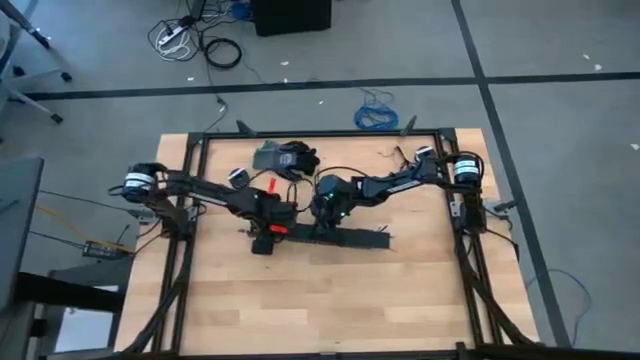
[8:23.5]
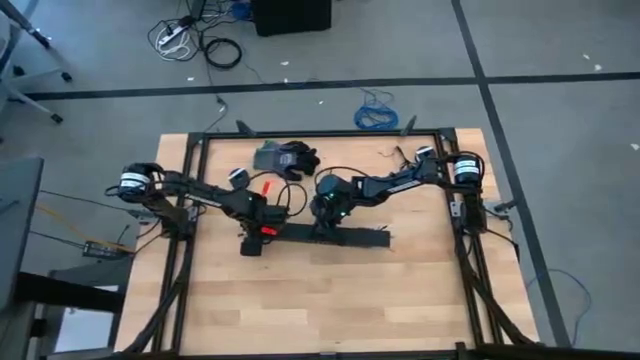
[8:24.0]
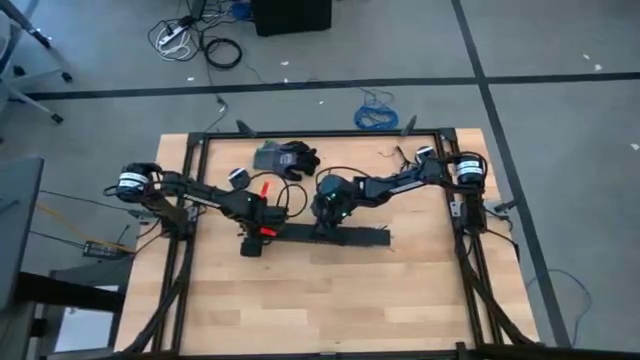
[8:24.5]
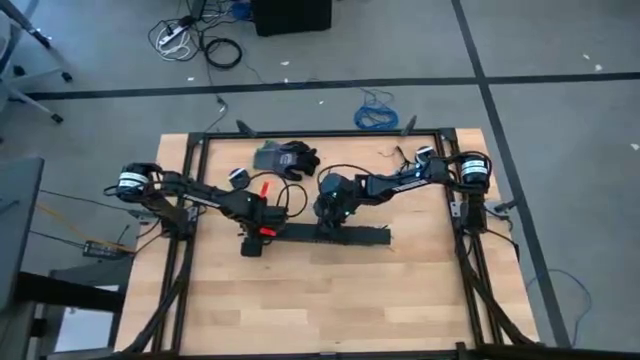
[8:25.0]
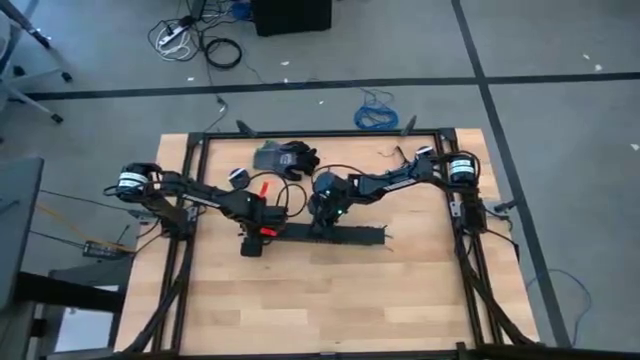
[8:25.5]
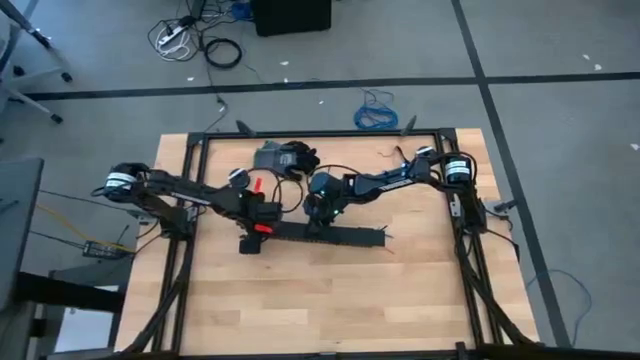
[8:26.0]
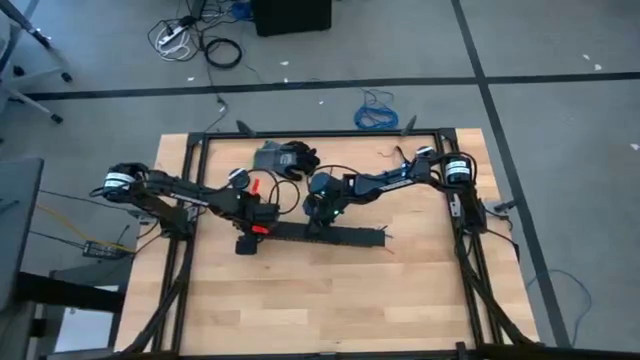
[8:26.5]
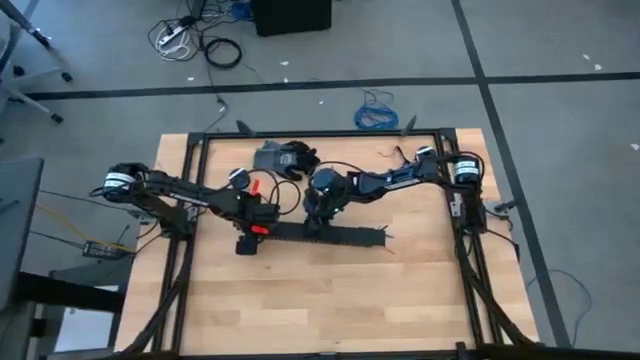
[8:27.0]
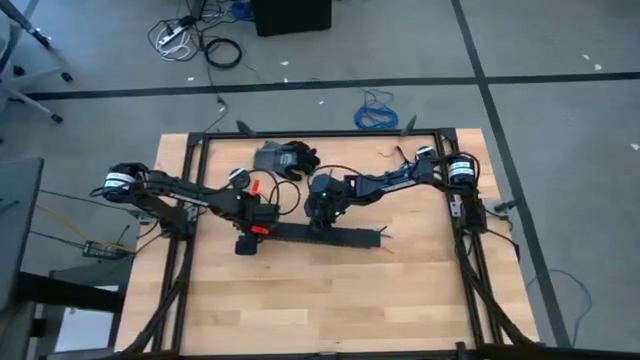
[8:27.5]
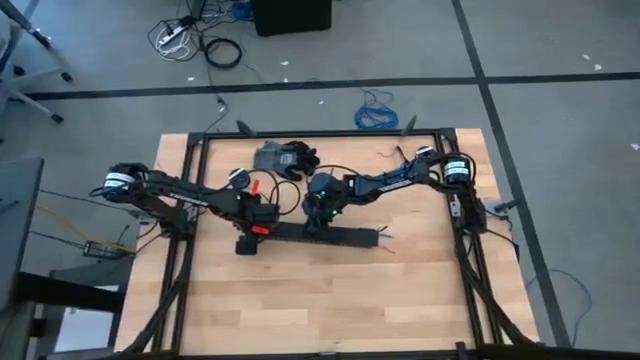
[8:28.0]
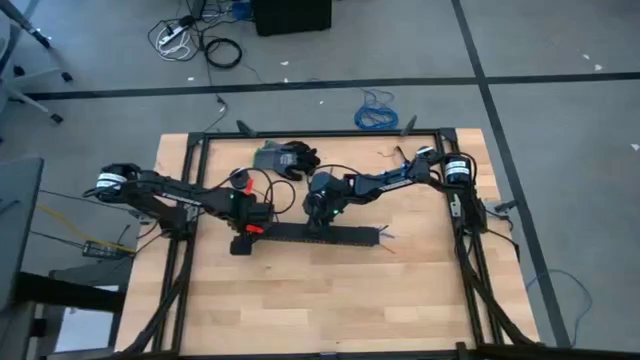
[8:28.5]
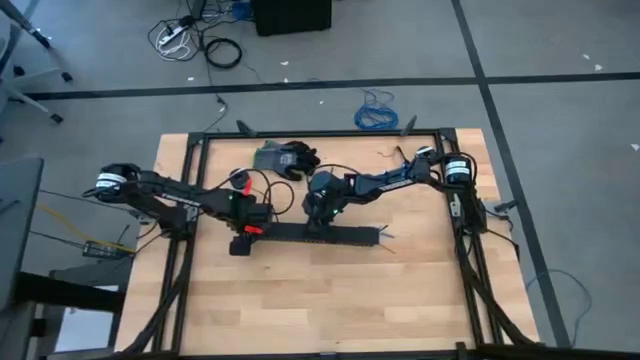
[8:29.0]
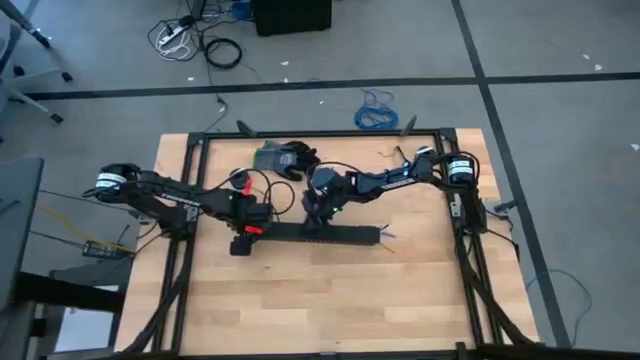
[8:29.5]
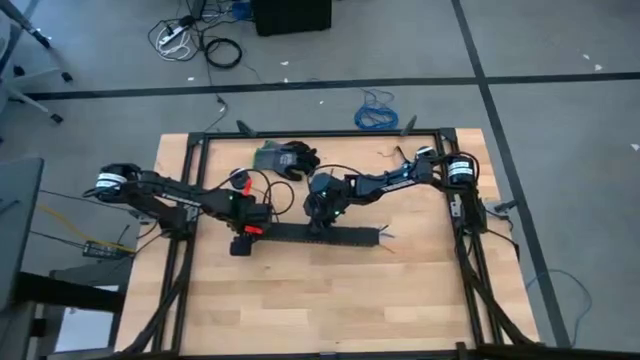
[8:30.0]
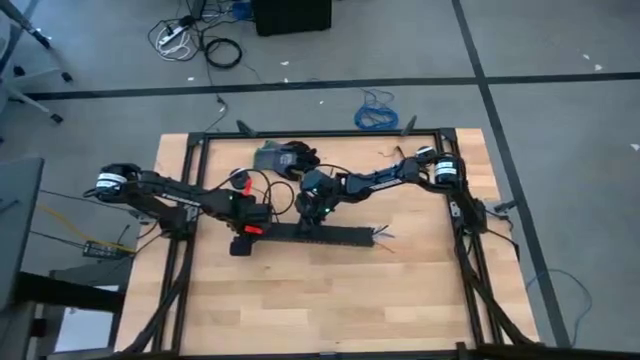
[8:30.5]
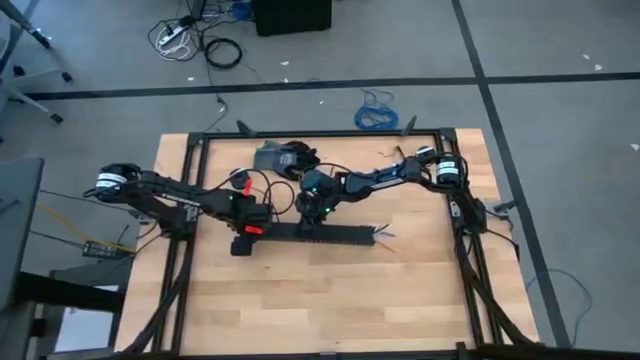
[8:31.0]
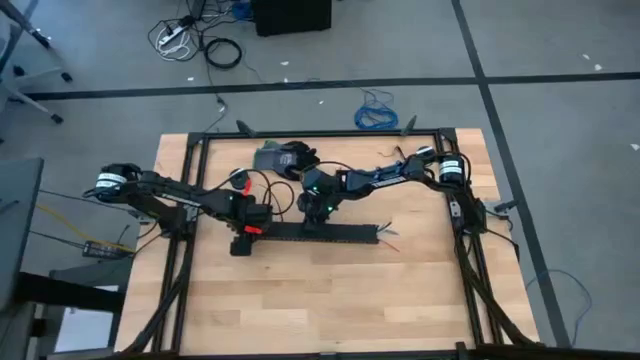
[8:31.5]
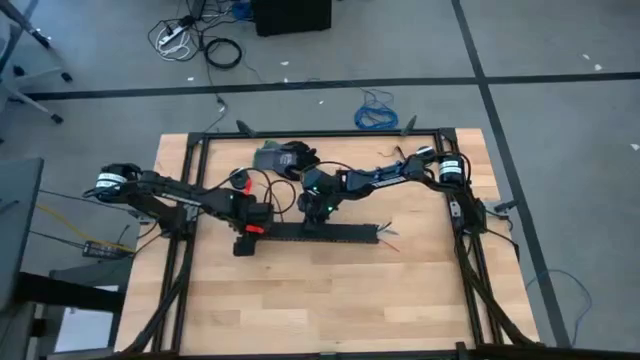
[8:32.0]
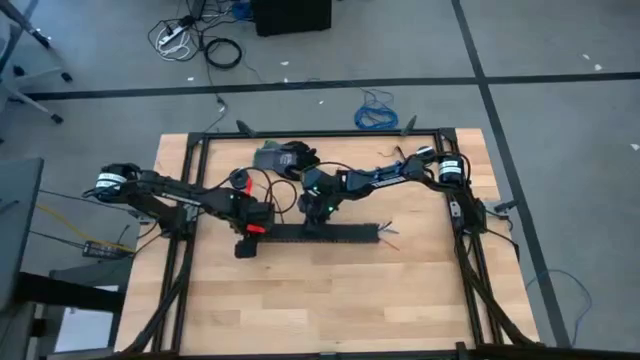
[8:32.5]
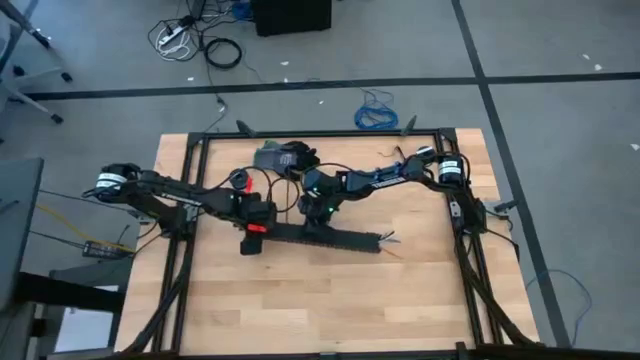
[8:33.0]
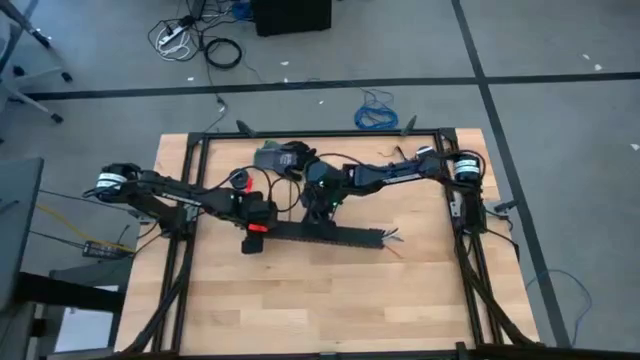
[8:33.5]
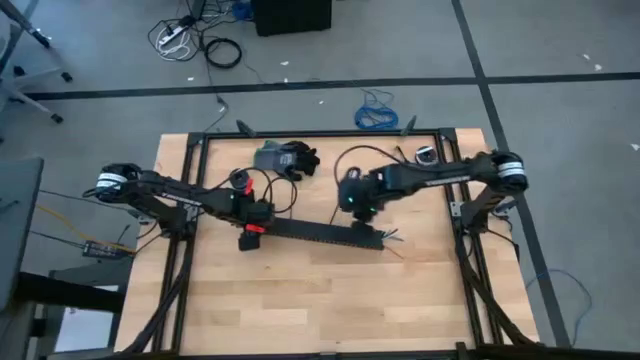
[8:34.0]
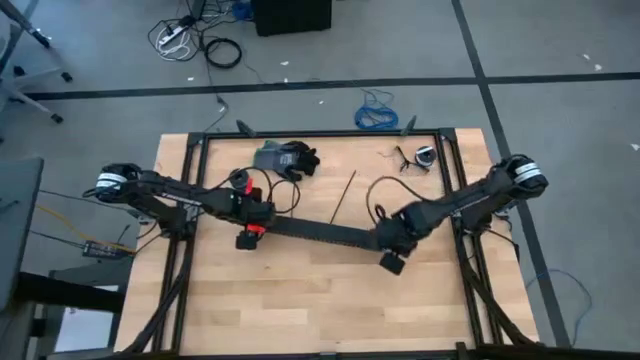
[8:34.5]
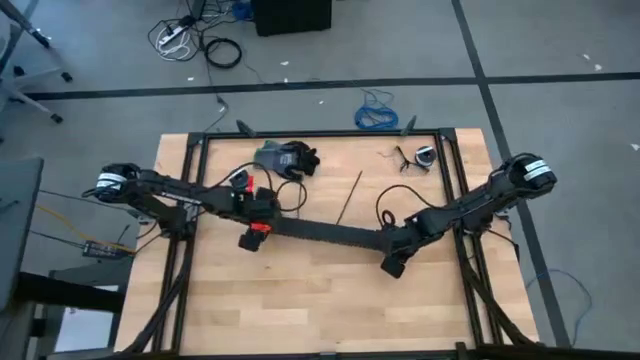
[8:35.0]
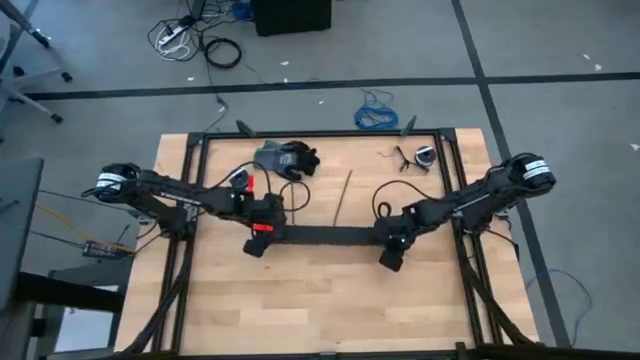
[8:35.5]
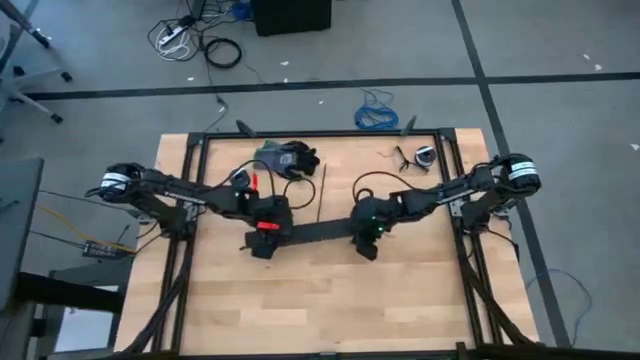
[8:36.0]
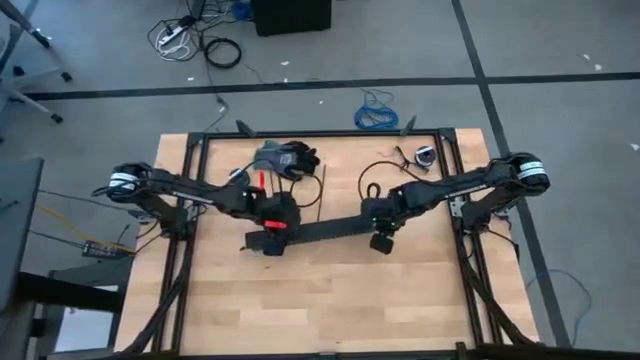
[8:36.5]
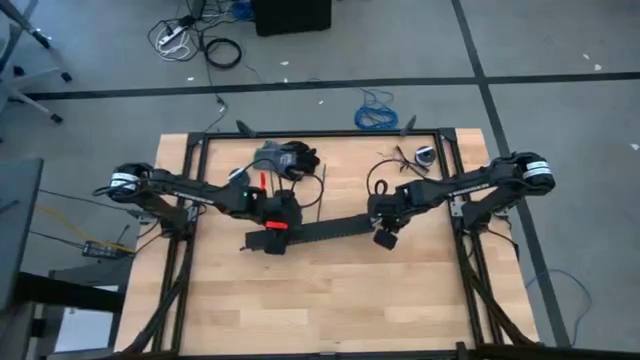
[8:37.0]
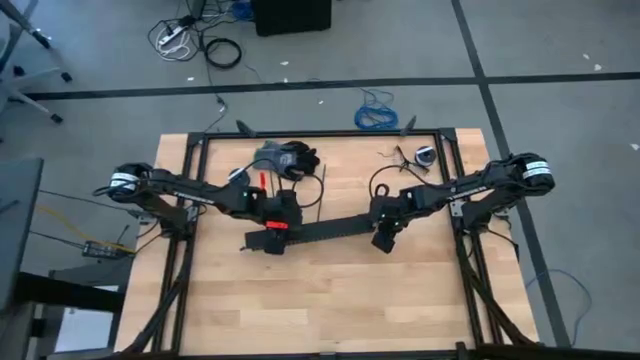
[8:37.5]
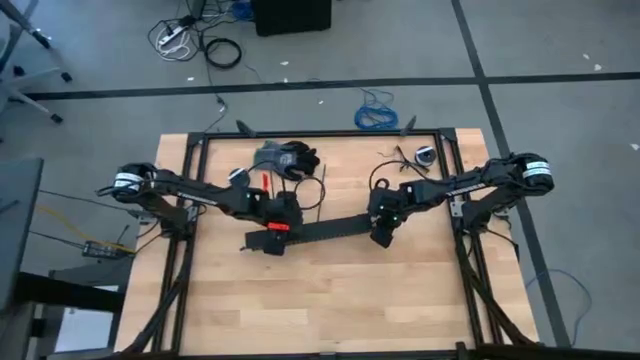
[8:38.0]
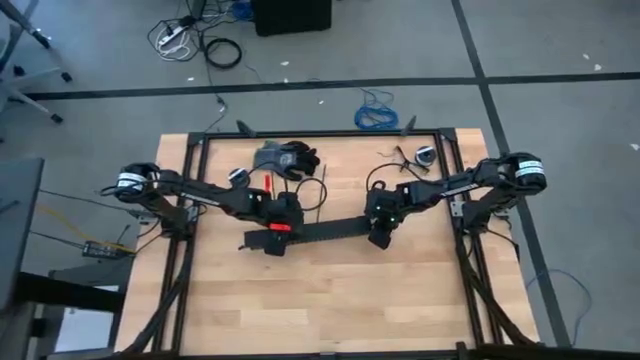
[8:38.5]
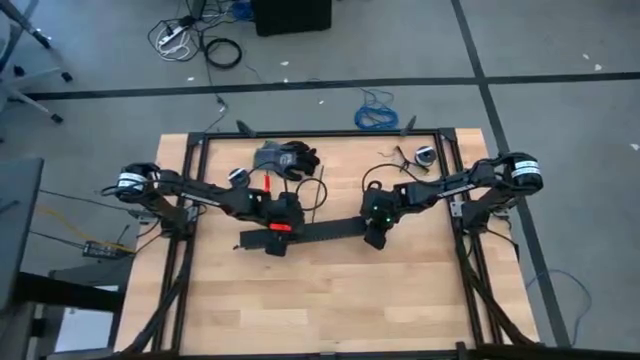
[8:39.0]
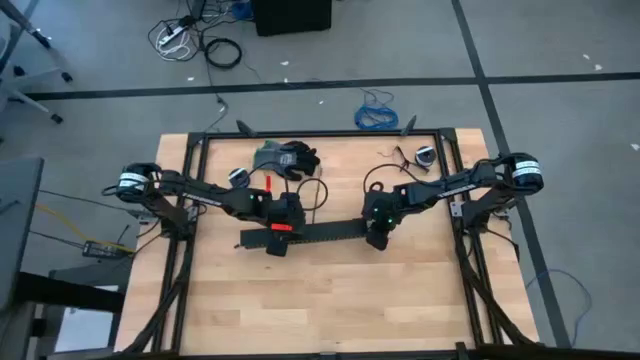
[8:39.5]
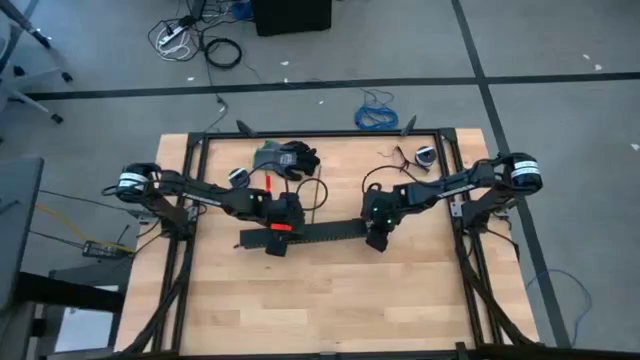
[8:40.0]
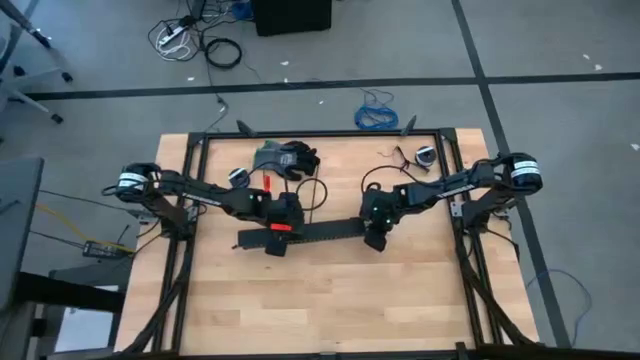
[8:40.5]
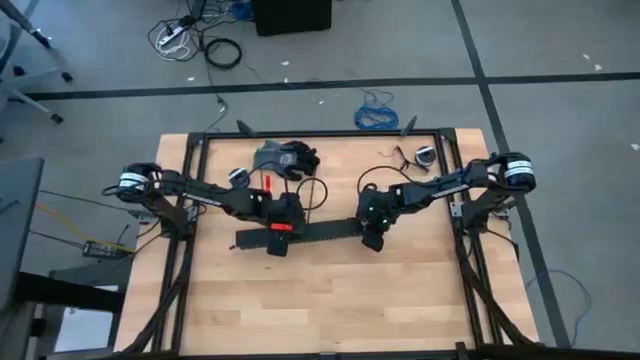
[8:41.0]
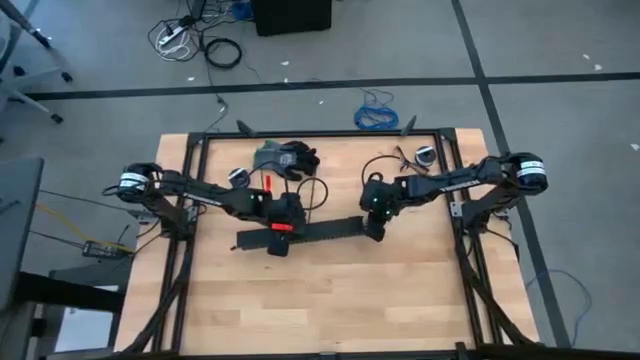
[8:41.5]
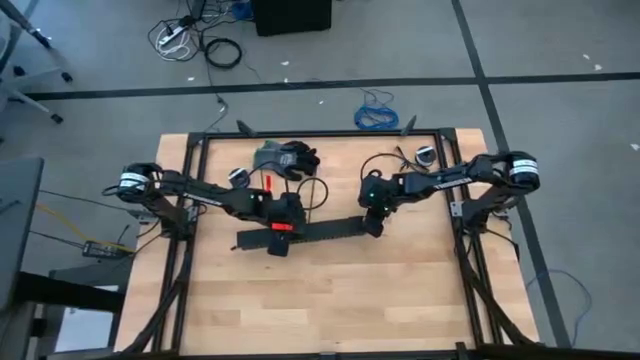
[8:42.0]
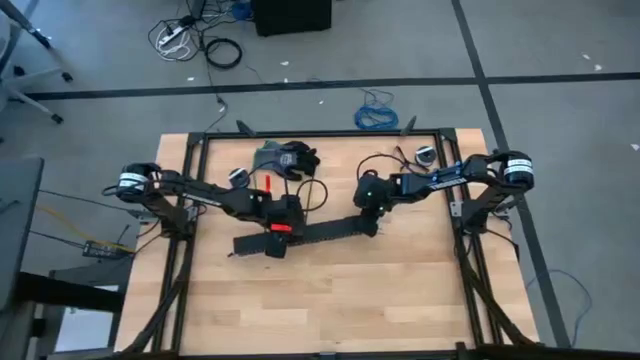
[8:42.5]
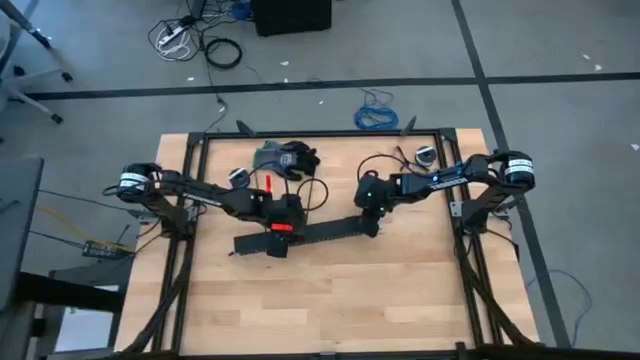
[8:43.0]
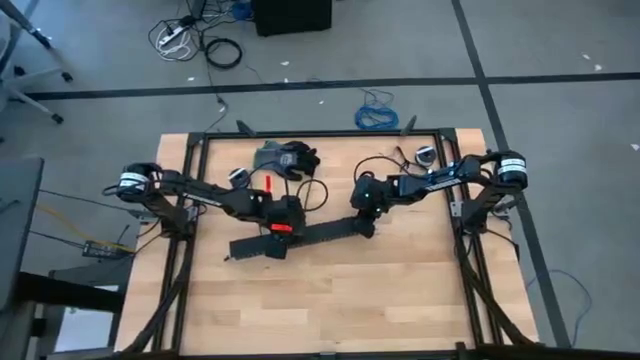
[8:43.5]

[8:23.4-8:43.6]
Task: Ziptie cables
Close the black cable duct cover
